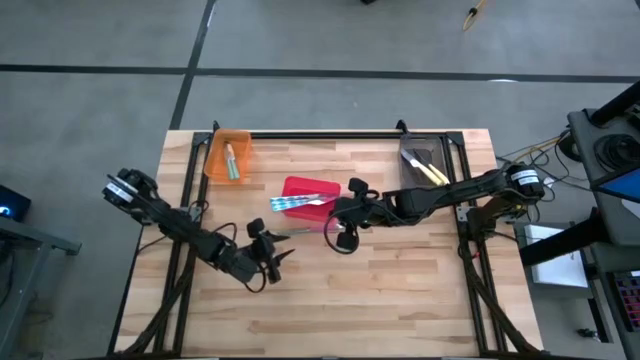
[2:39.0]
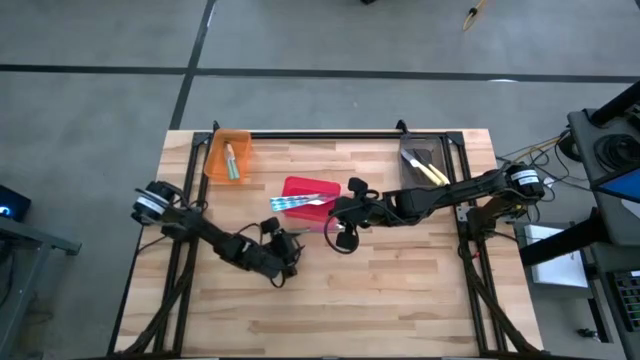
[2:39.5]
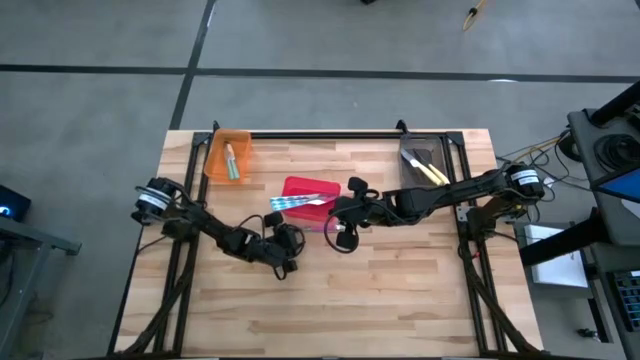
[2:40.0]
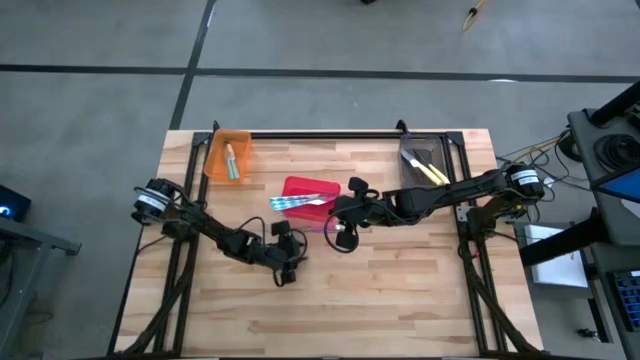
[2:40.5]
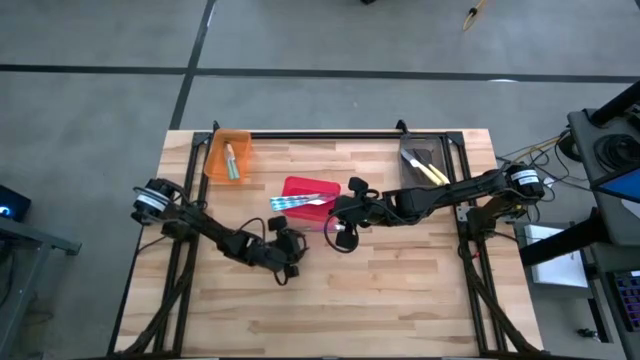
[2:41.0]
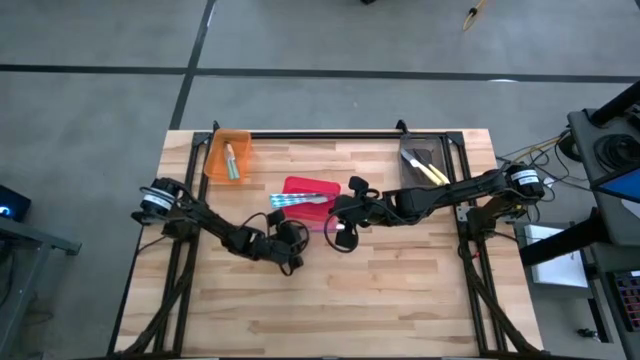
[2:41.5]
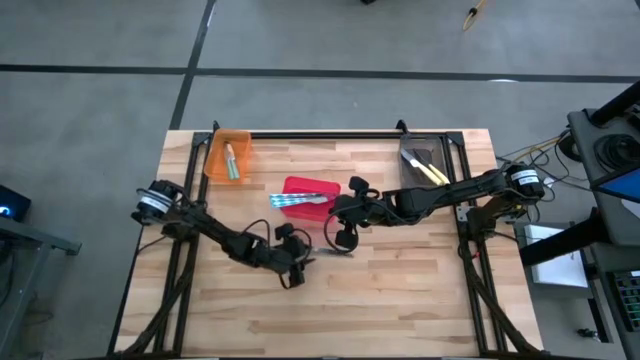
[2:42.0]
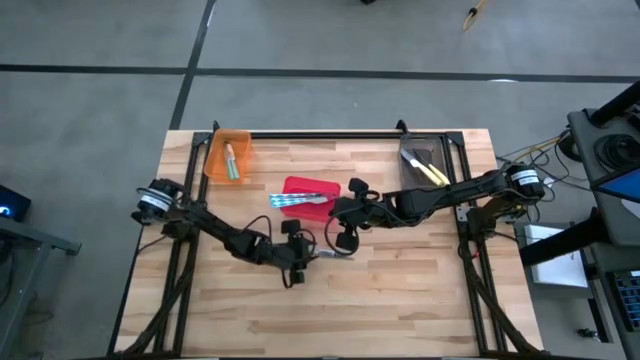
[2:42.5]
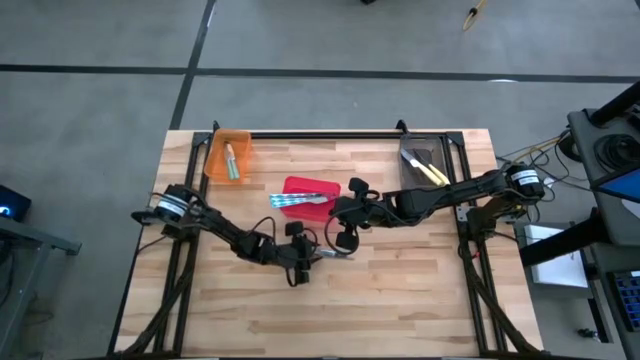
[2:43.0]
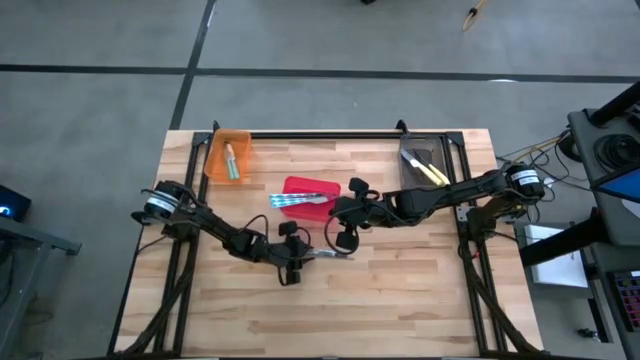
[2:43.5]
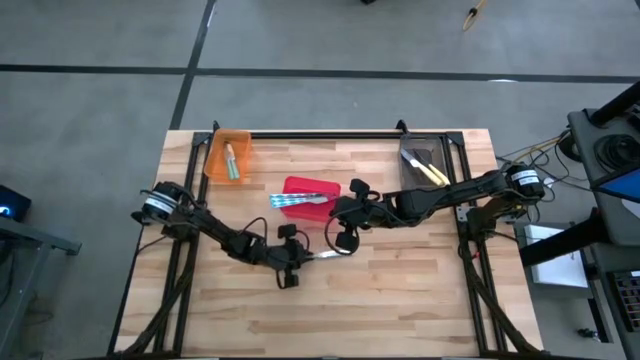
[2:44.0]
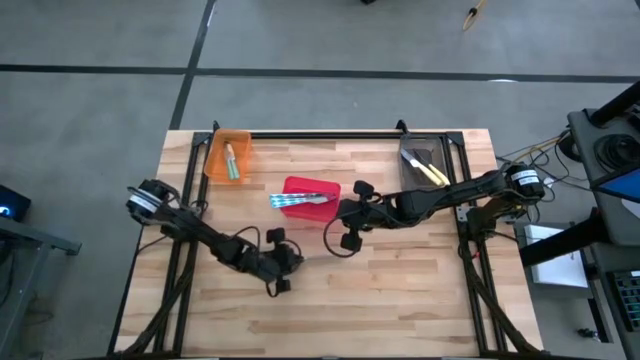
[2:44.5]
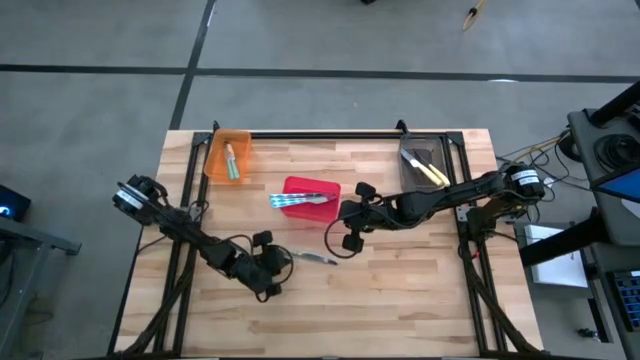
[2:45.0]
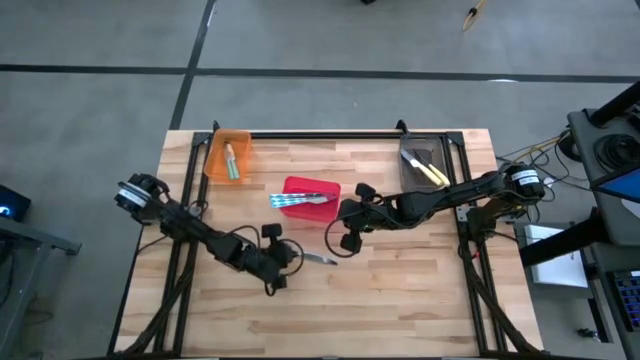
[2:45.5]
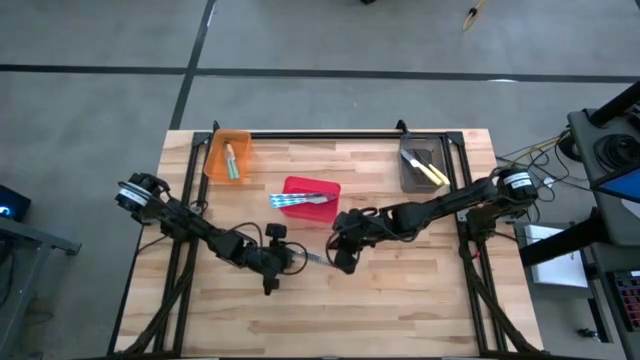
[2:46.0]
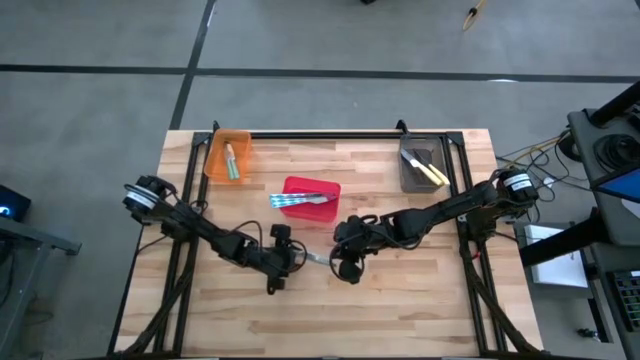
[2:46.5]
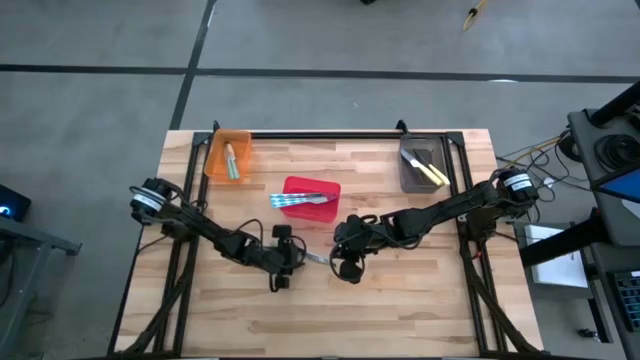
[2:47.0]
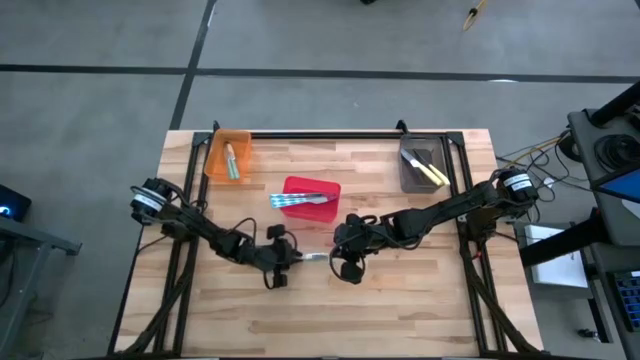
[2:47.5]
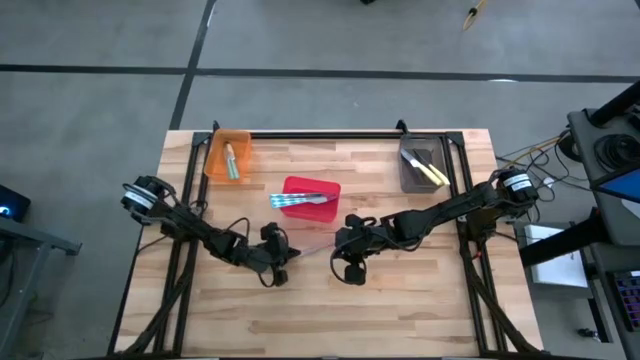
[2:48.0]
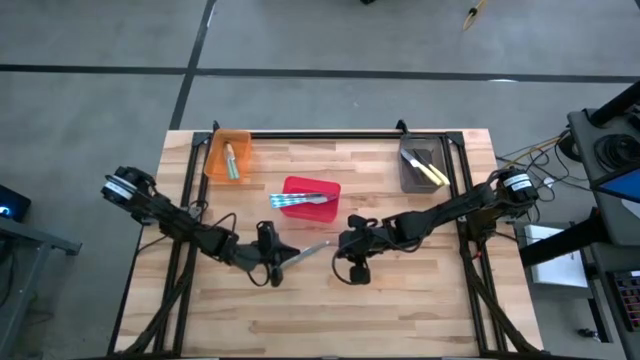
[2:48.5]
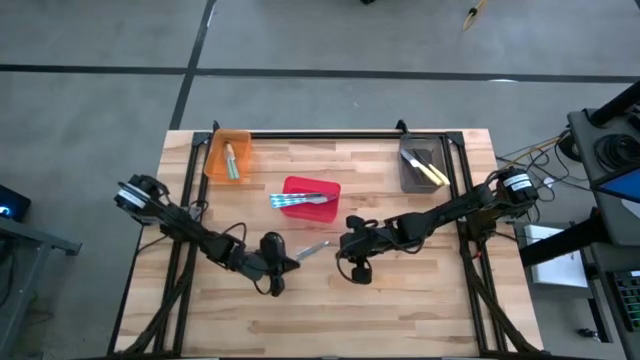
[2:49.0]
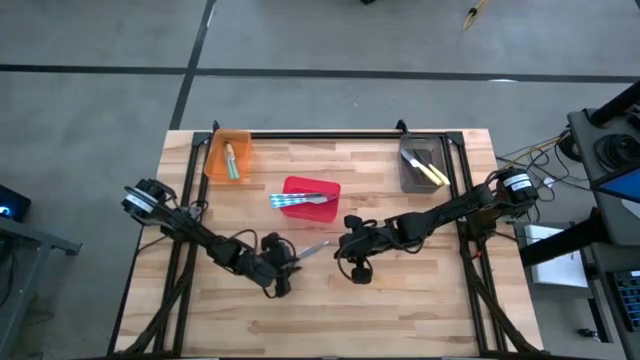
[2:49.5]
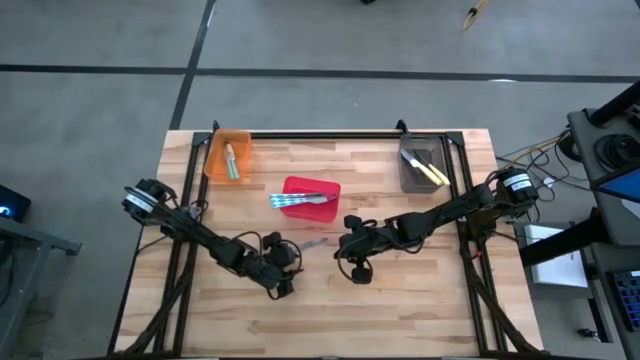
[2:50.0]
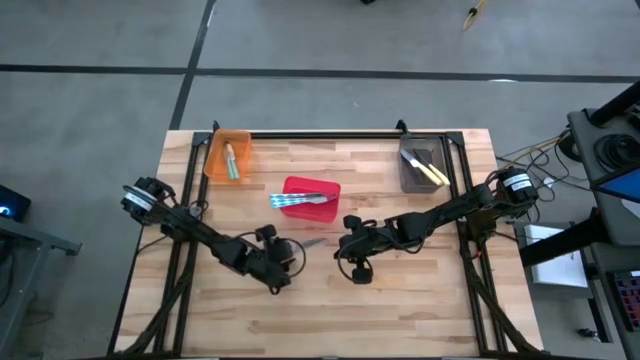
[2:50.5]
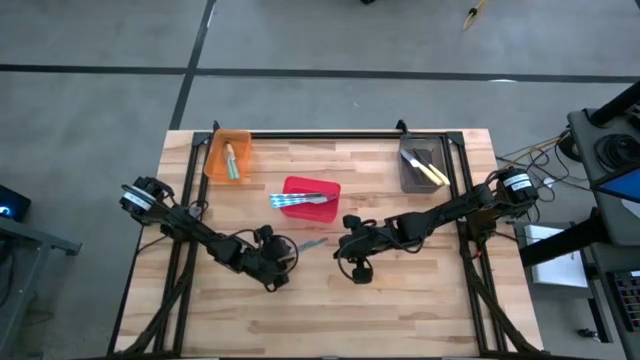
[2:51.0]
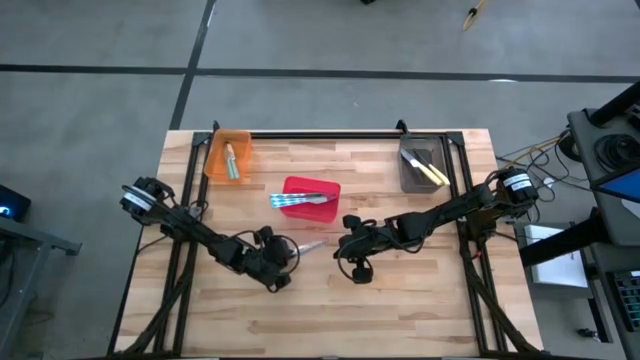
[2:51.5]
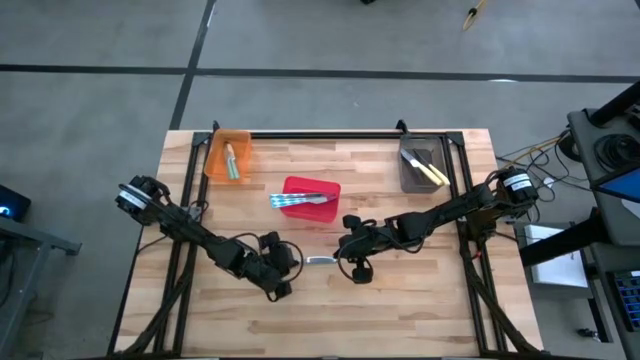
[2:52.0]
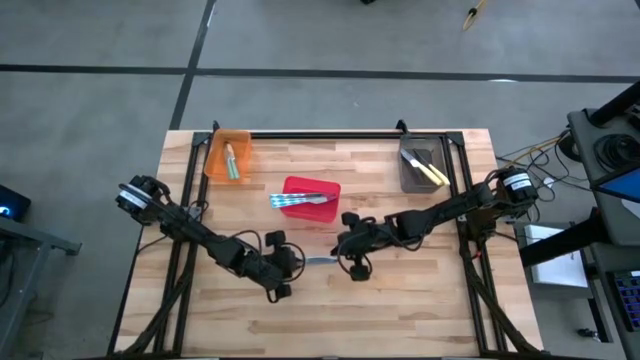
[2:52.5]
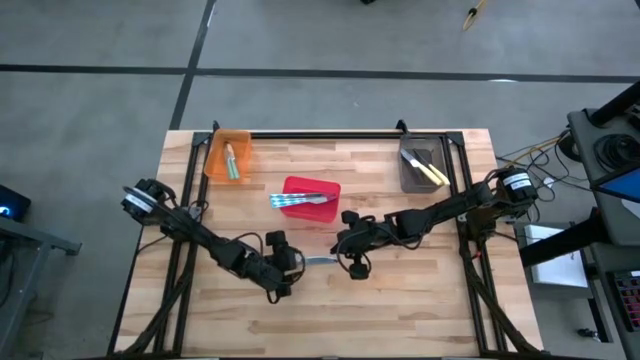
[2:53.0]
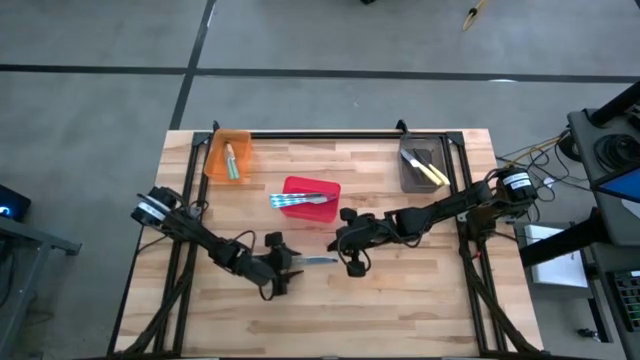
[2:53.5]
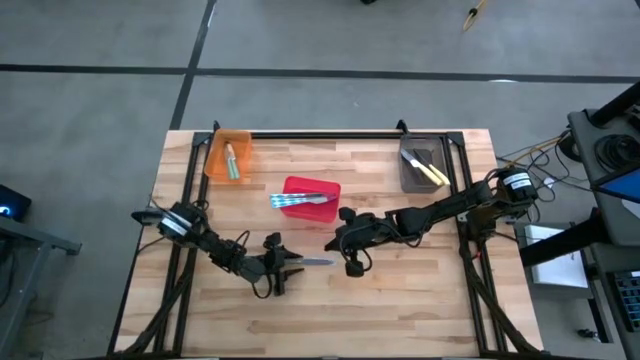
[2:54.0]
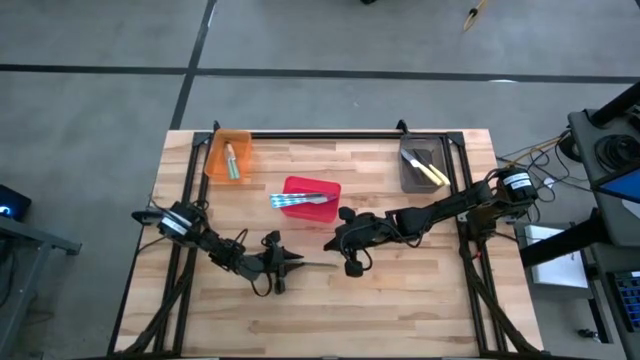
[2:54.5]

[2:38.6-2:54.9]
Task: Sort silverware by color (type)
Put the green table knife into the orange bin

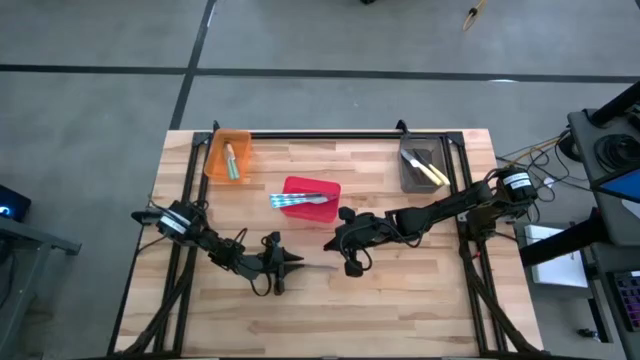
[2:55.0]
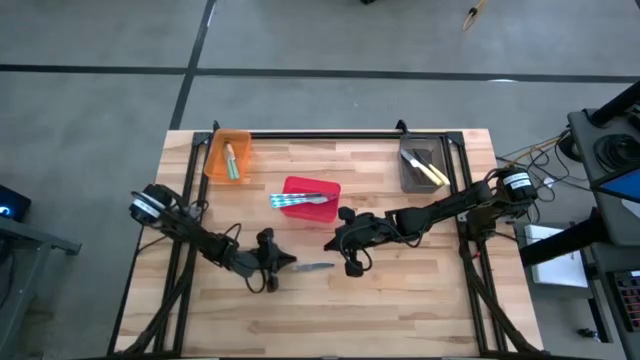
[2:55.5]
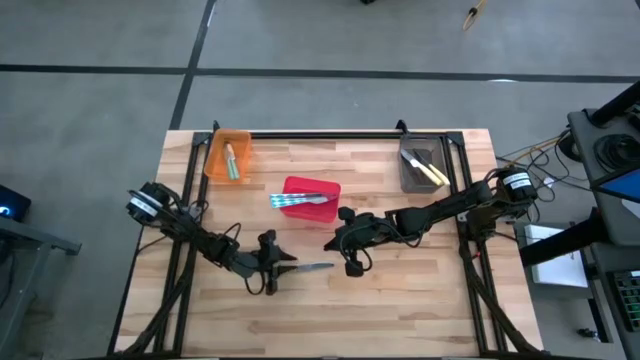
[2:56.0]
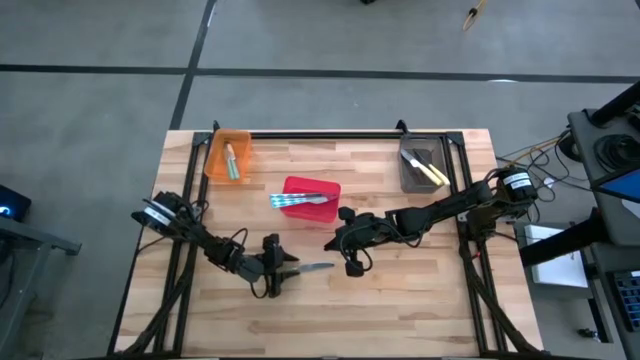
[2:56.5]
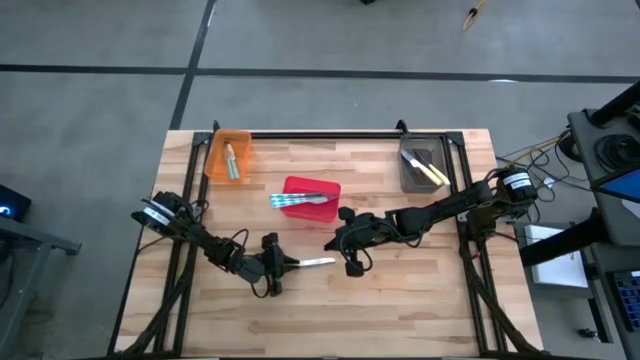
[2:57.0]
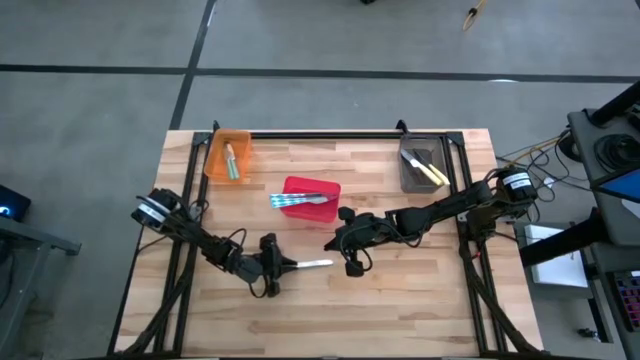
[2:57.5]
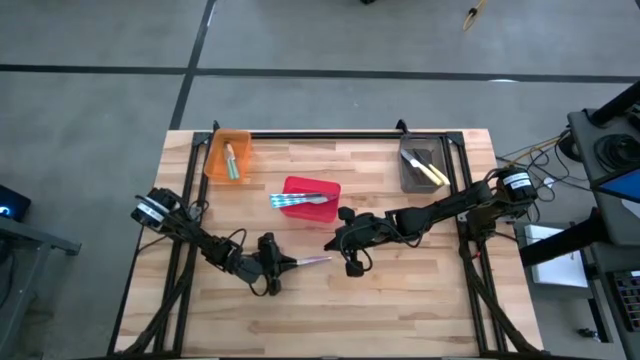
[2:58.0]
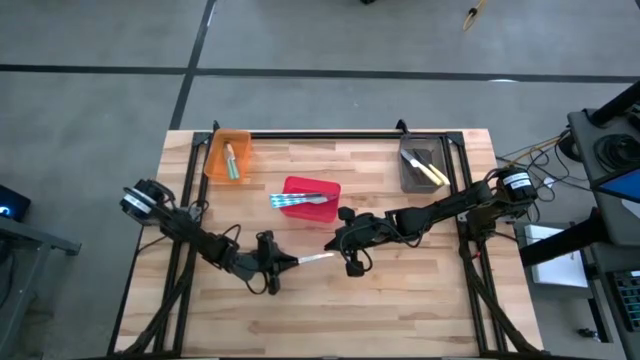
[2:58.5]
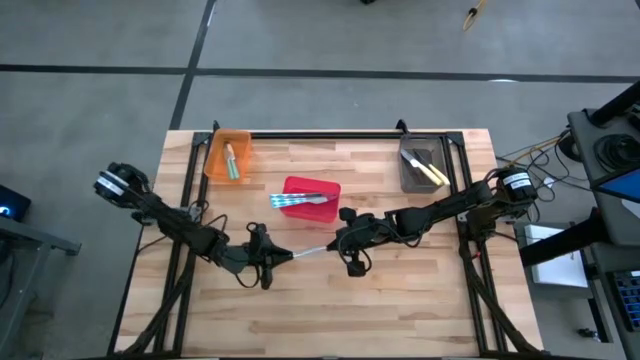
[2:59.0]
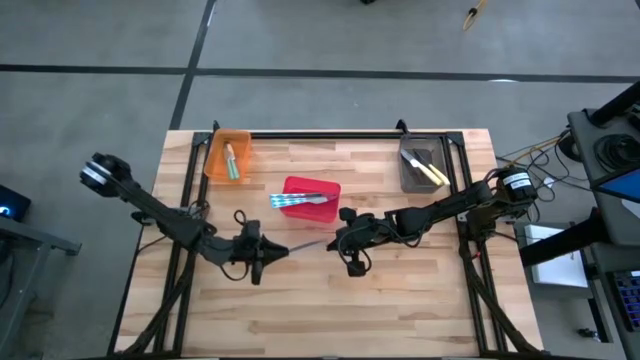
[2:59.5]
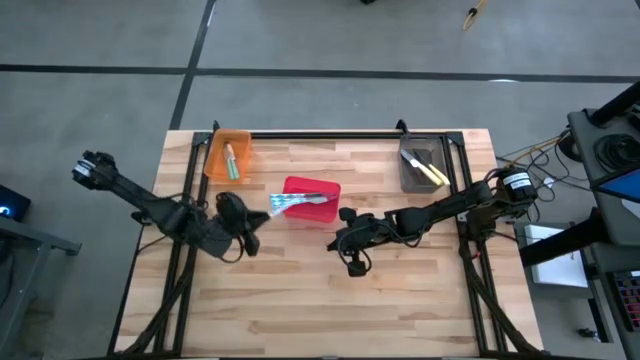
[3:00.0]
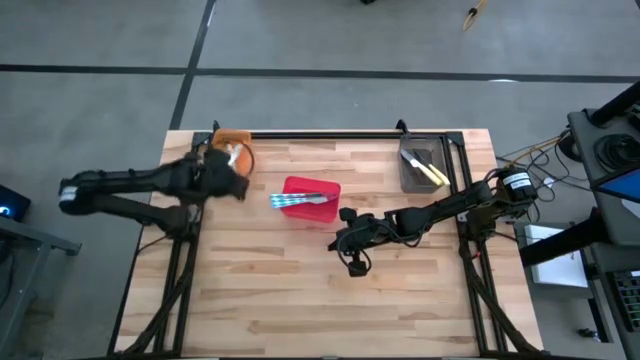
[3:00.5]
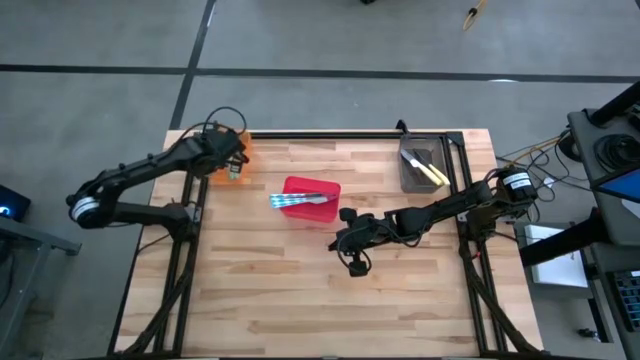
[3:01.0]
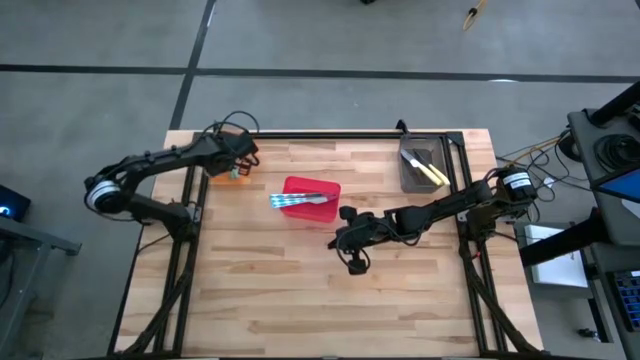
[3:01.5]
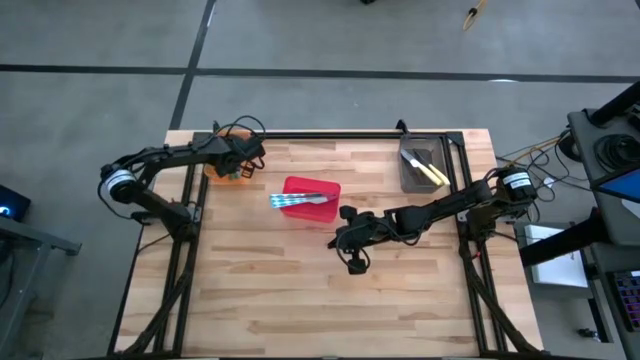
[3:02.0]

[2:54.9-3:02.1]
Put the green table knife into the orange bin
